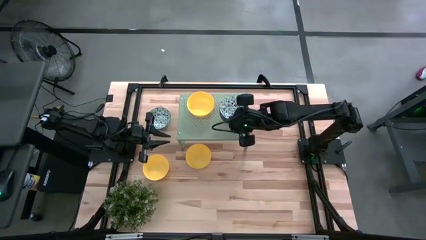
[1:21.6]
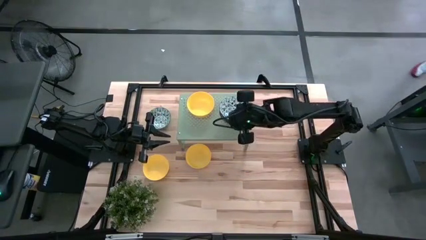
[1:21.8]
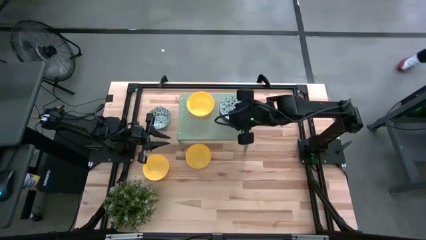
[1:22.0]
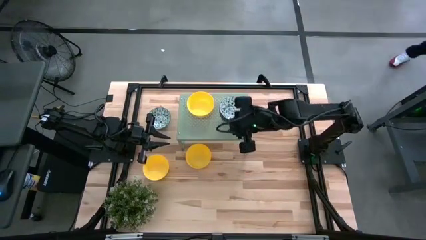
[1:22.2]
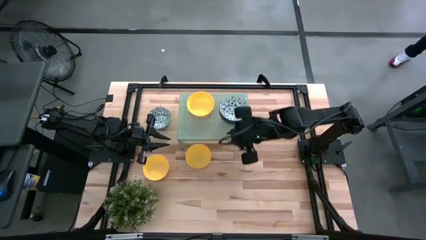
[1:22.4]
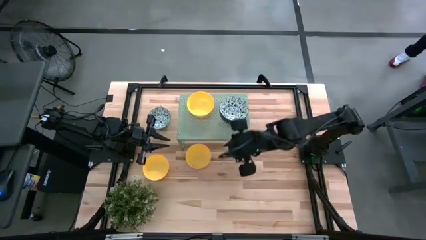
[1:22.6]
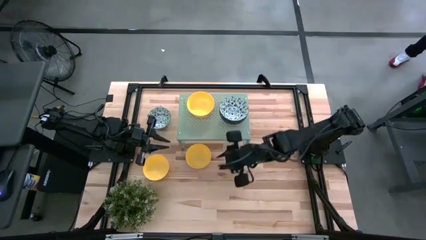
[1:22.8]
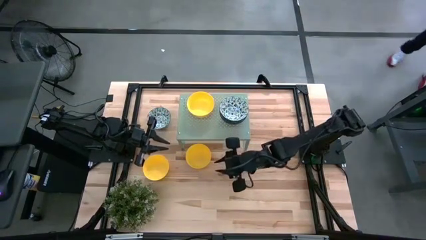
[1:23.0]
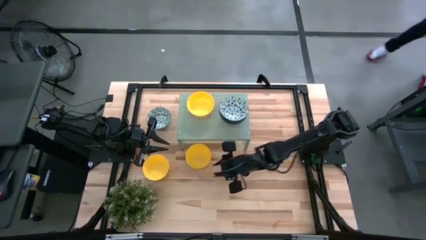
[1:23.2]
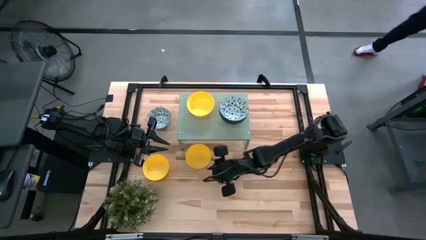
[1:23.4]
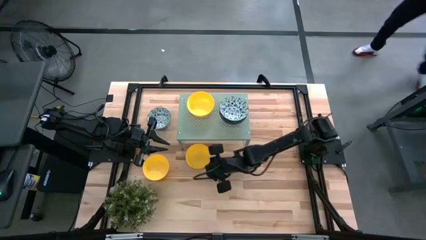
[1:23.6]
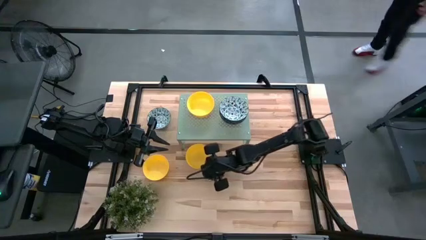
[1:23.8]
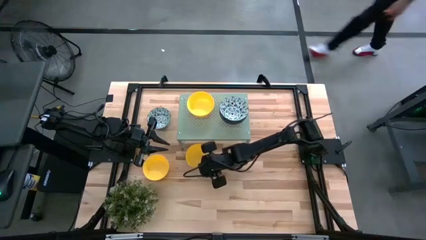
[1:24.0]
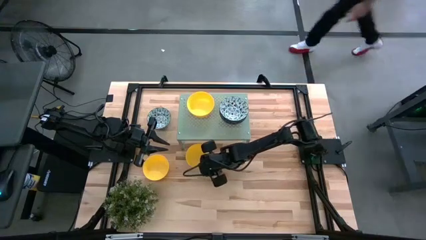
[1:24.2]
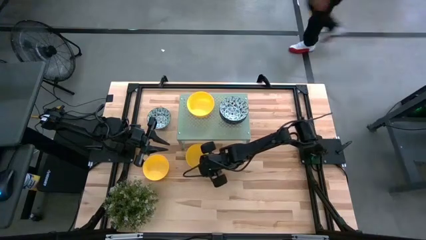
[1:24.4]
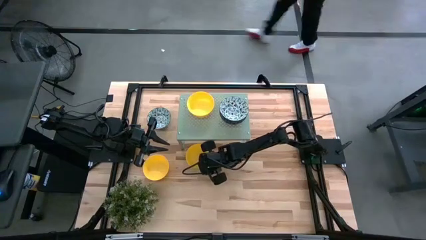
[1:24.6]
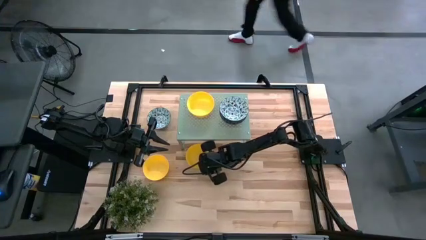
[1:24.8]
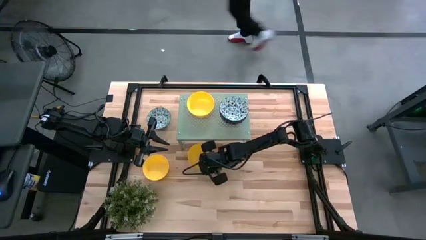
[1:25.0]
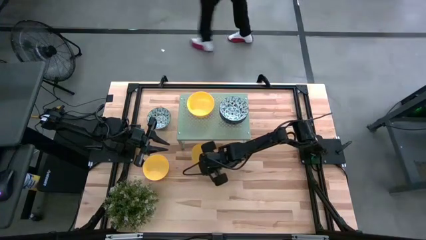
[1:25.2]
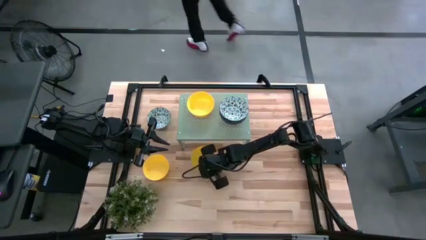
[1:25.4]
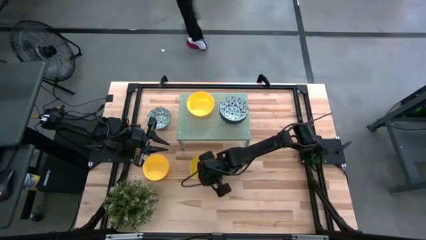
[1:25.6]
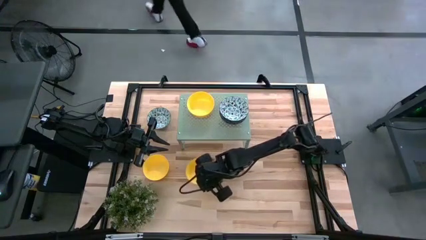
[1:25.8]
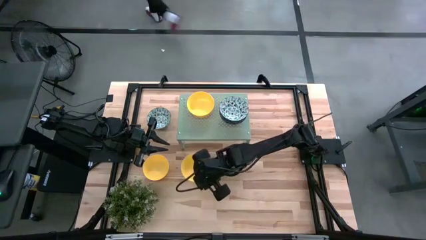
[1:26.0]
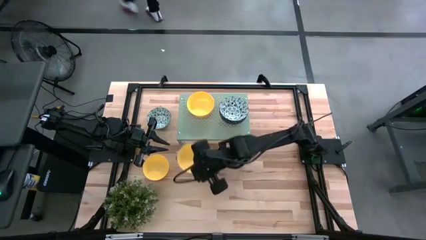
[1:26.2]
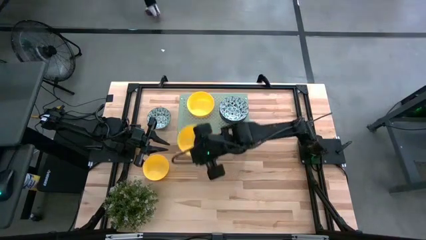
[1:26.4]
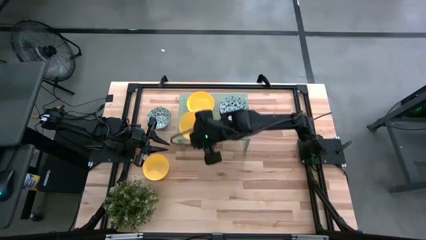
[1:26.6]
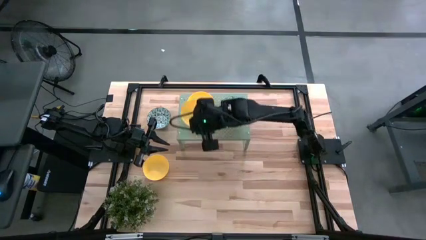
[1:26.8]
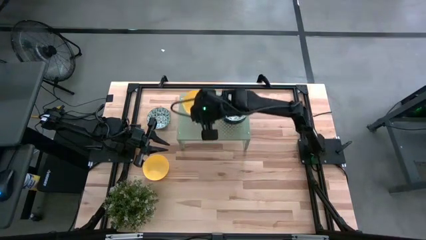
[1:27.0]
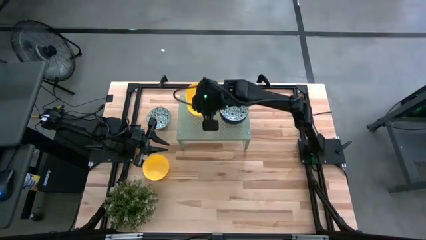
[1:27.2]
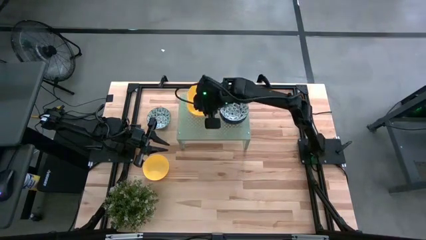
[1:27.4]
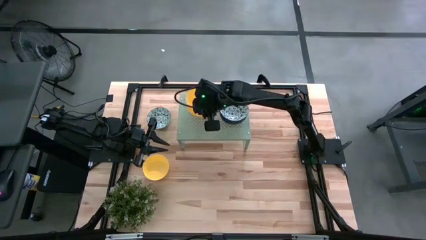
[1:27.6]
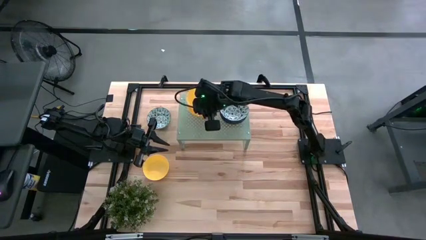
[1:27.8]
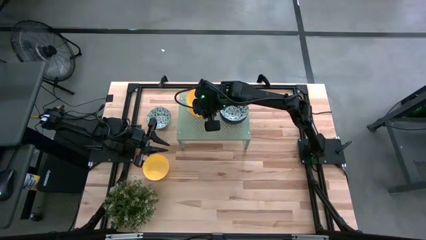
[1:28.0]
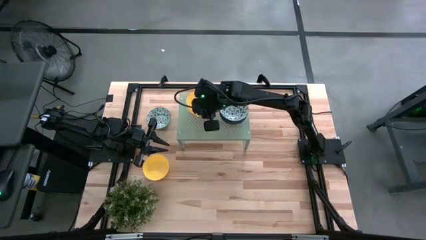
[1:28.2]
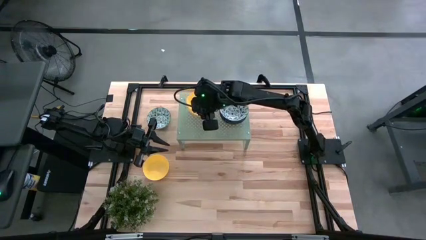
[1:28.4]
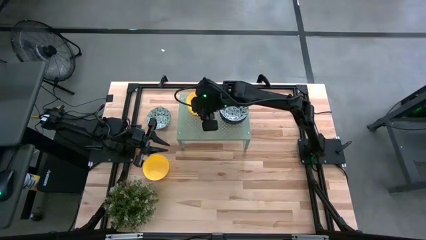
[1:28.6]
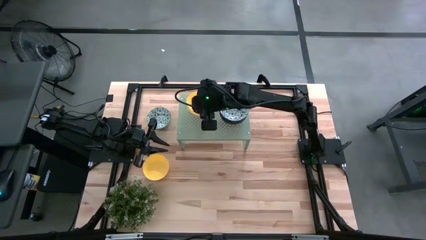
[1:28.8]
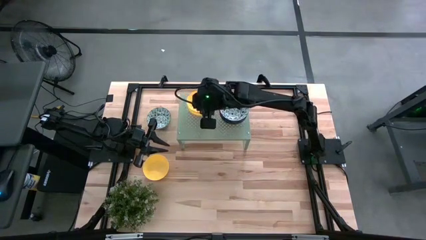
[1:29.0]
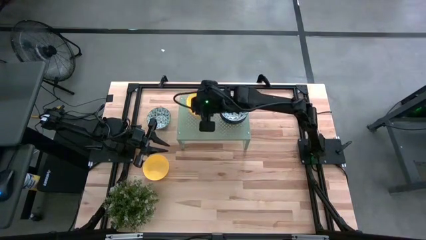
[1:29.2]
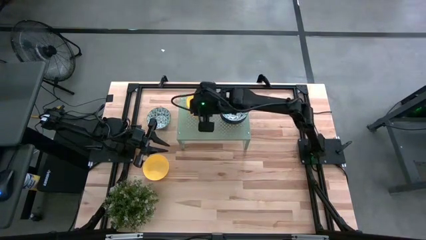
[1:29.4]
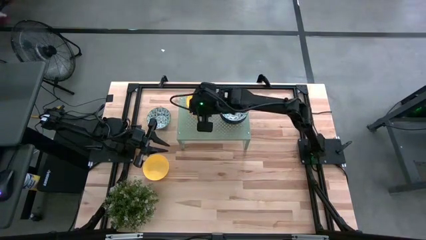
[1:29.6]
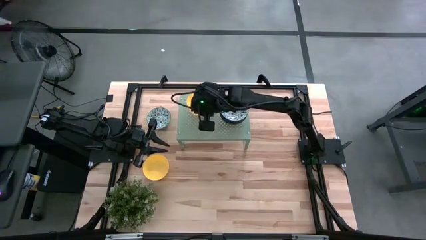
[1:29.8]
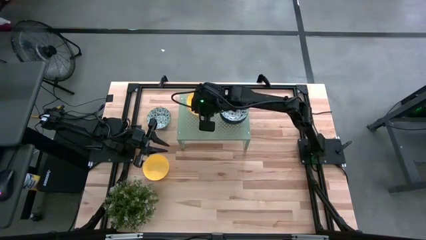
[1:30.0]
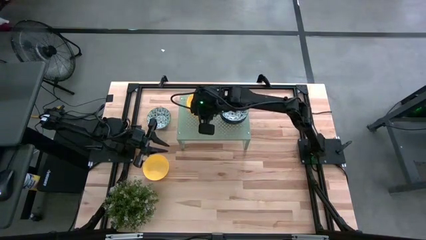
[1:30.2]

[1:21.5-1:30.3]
Task: Pick & Place Mini bowls
Stack the yellow bowl on top of the yellow bowls on the shelf
